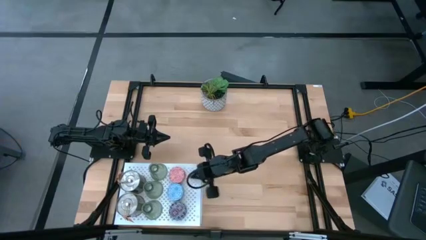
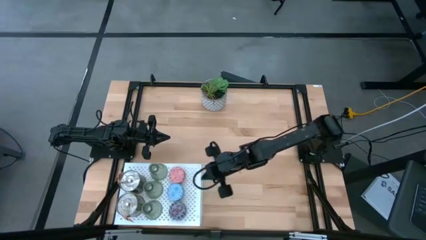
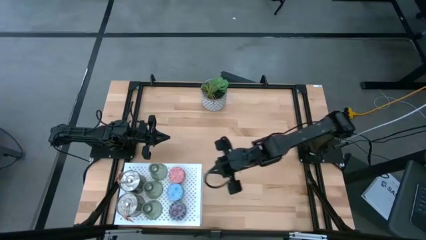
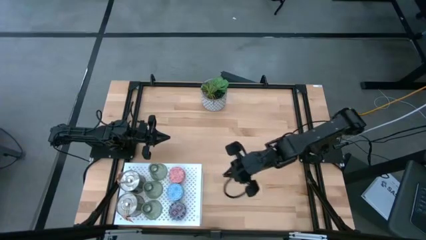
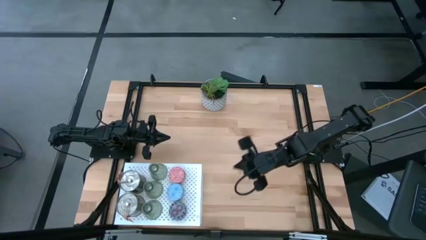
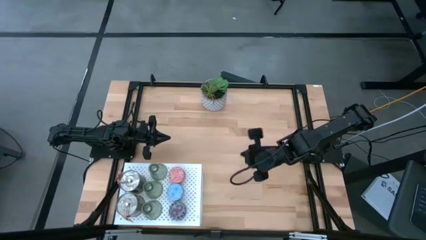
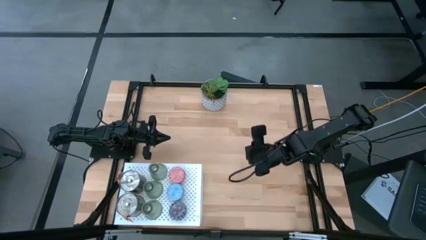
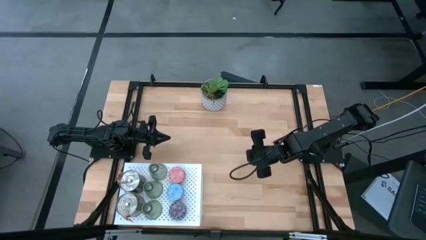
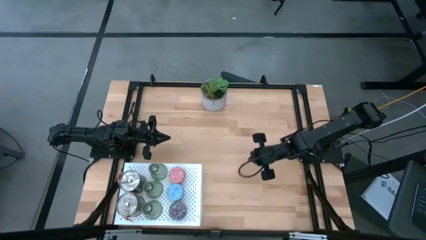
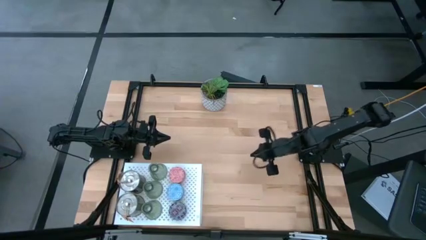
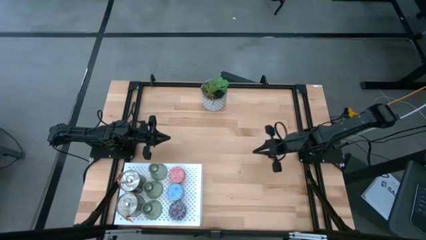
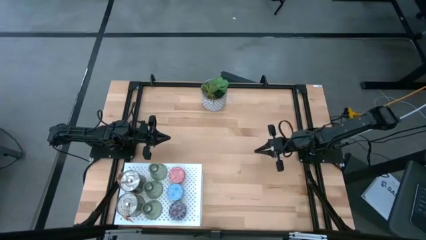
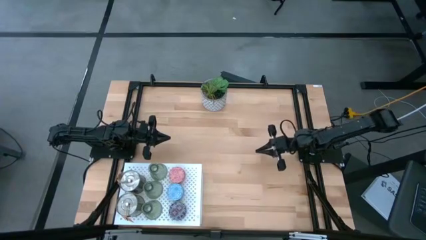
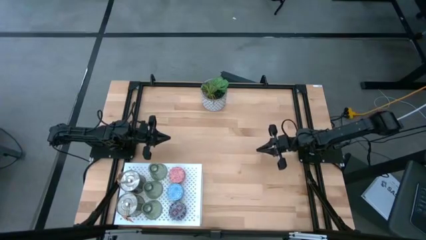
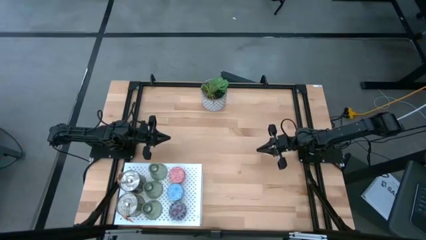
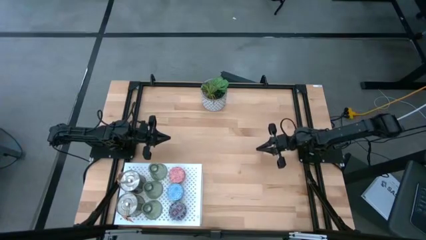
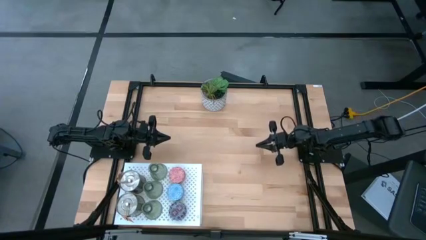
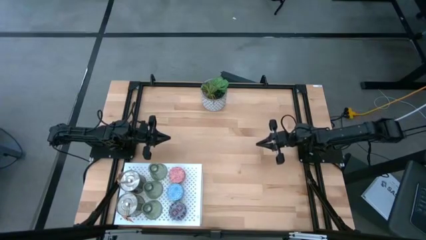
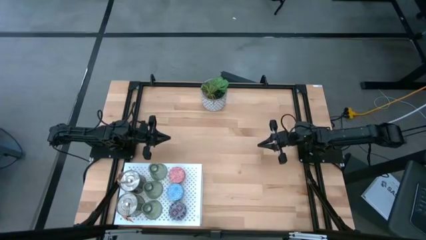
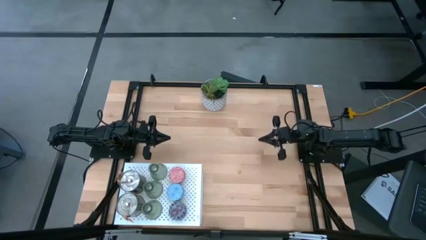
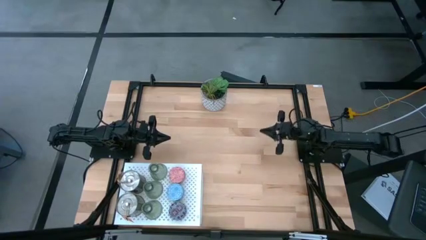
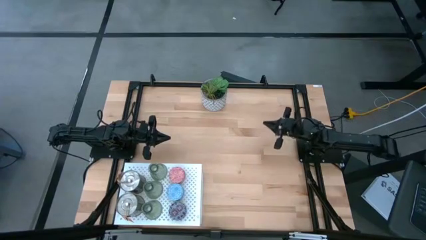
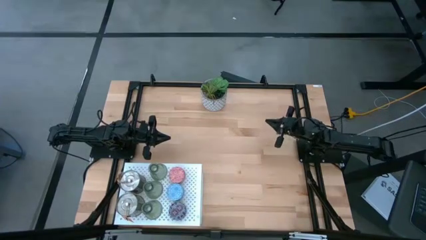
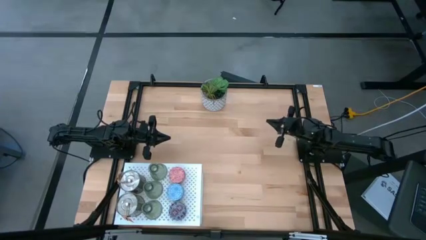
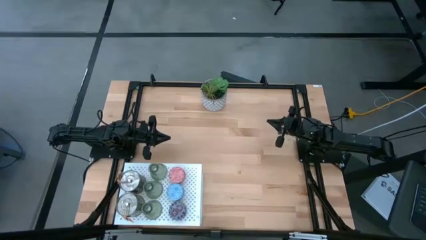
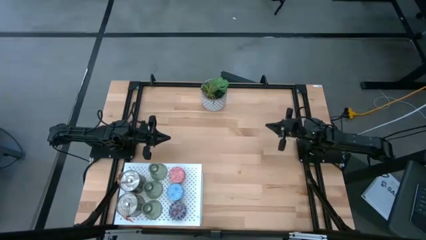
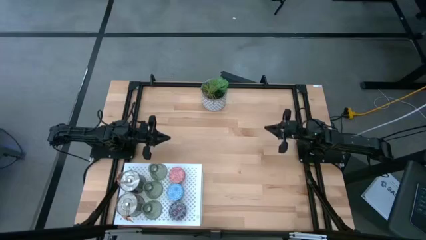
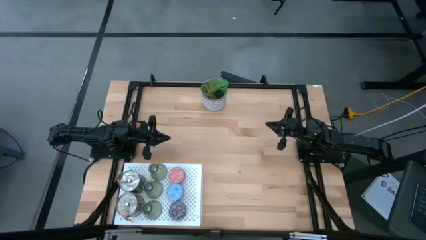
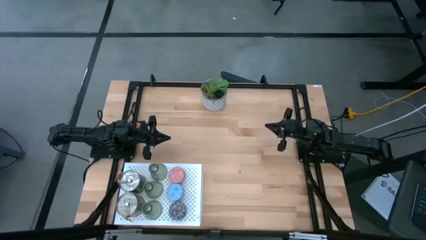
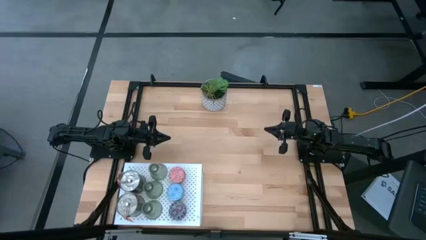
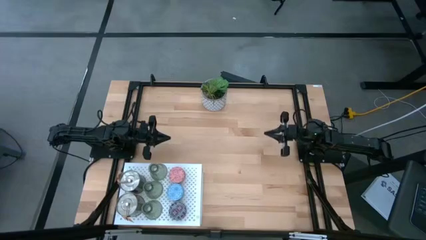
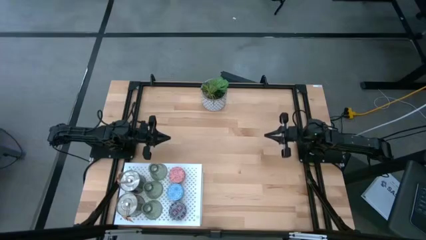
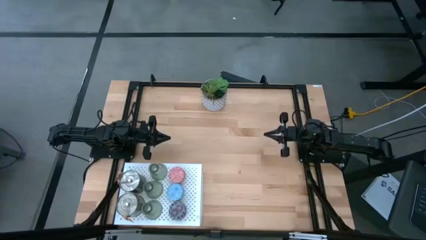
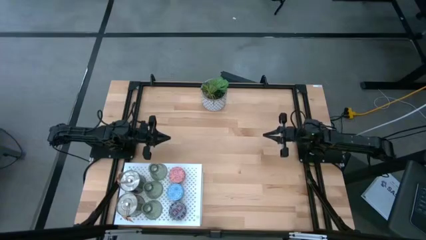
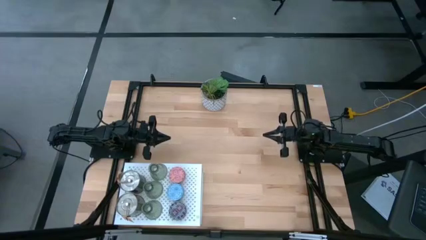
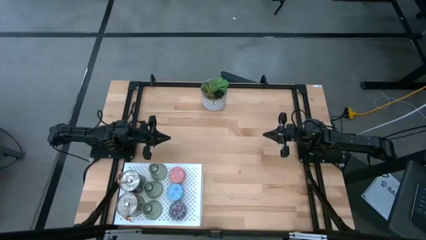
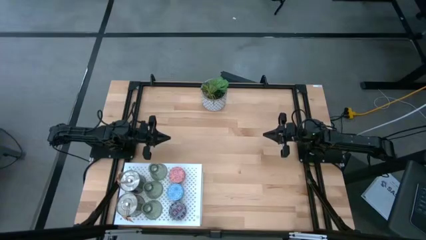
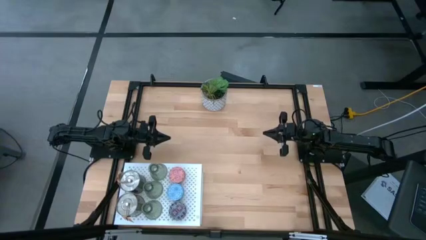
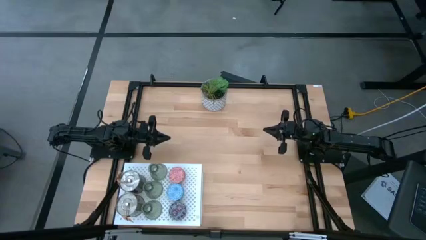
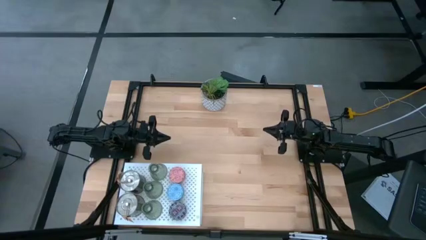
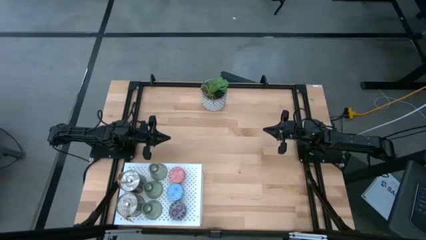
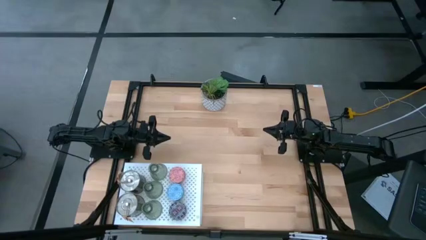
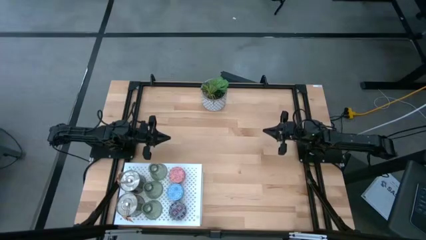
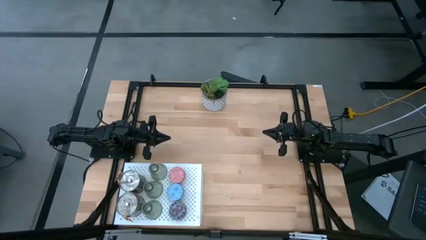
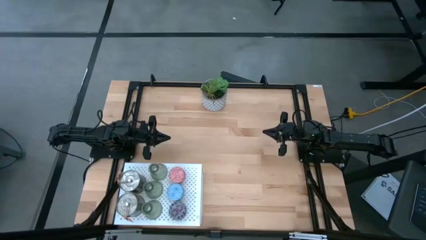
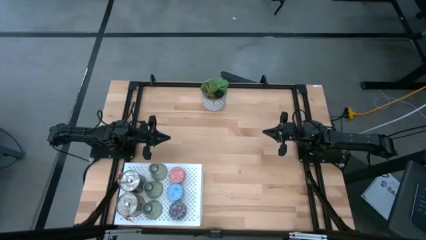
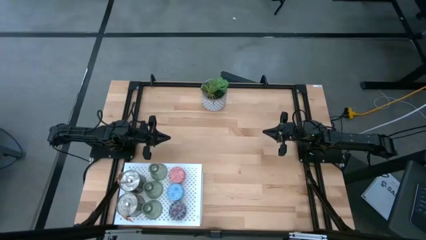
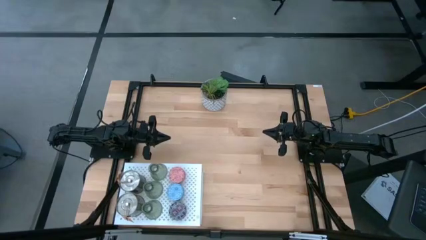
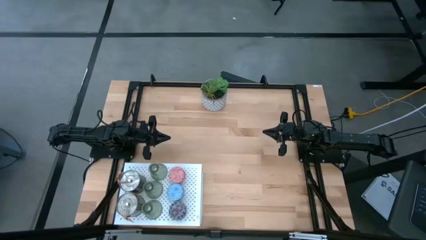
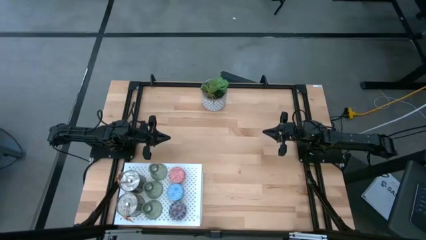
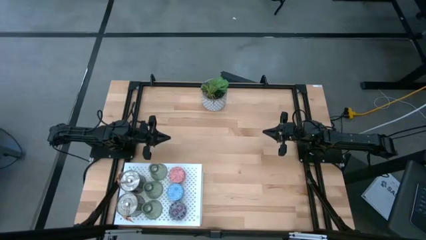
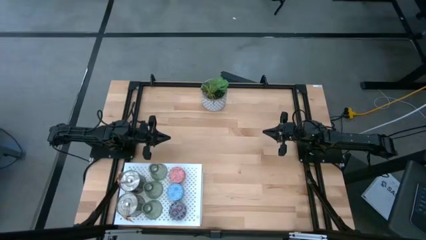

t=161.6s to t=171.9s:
Task: Pick & Place candle stick holders
Return to Home Position

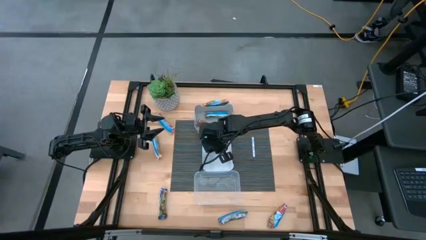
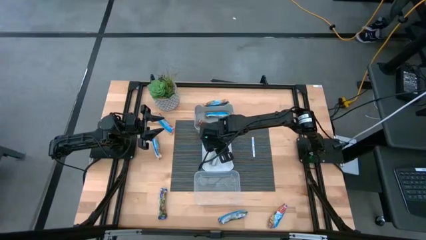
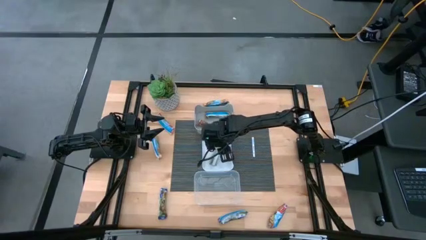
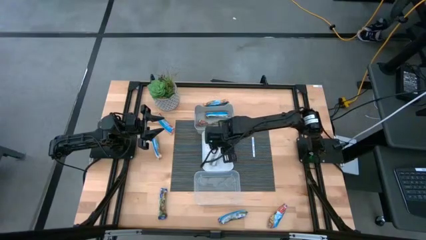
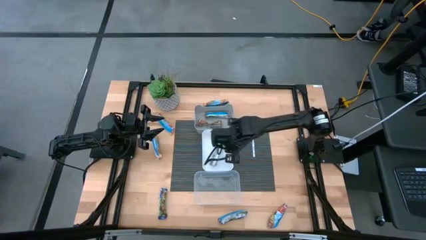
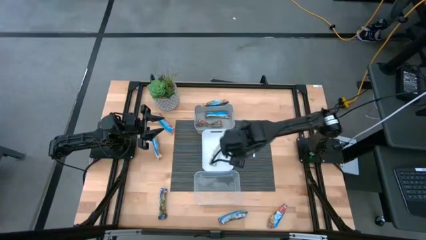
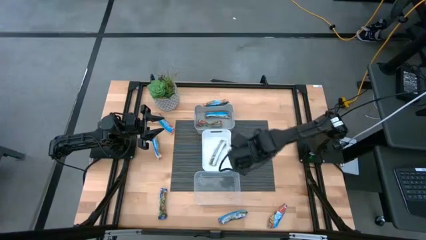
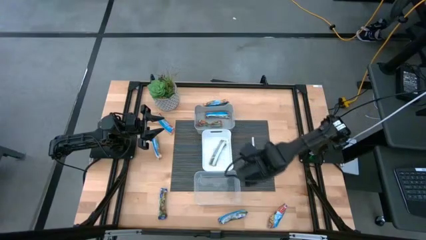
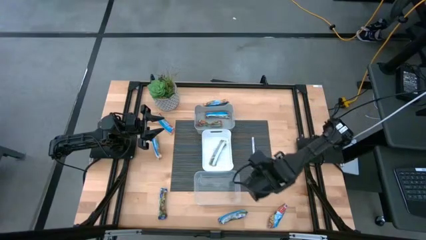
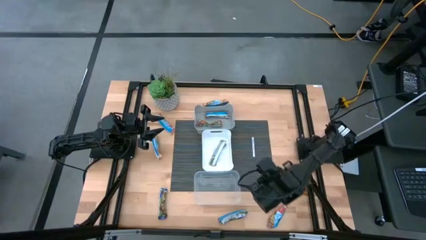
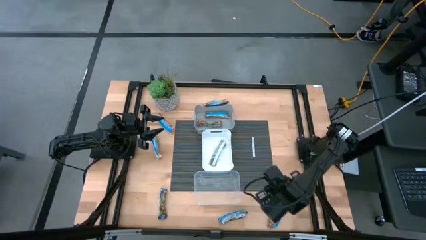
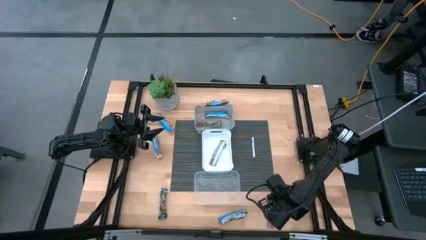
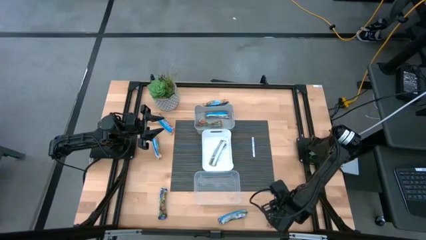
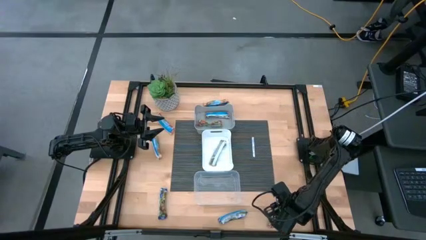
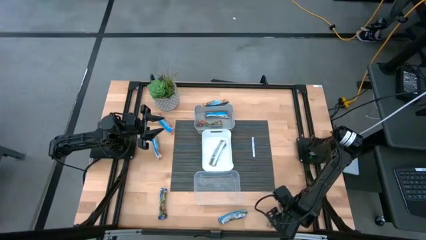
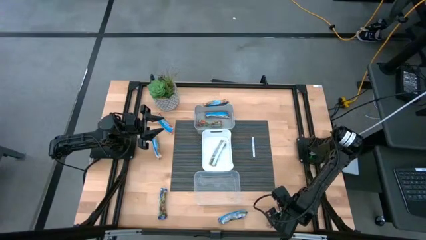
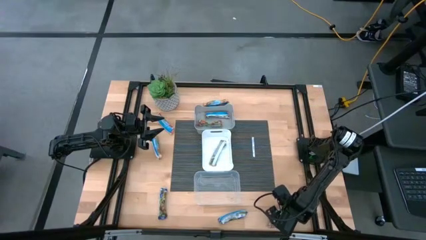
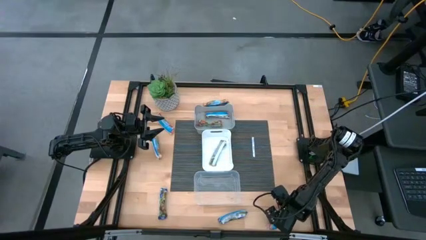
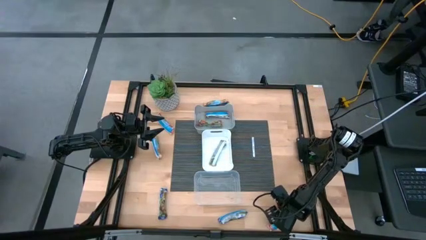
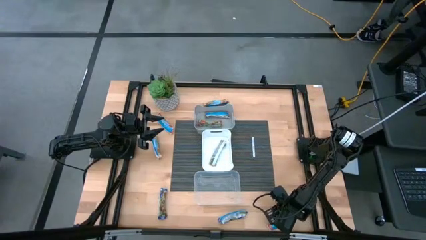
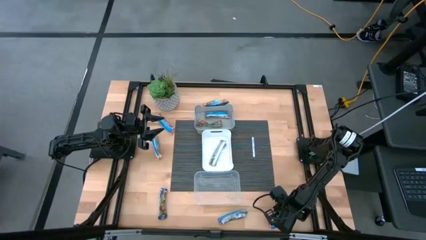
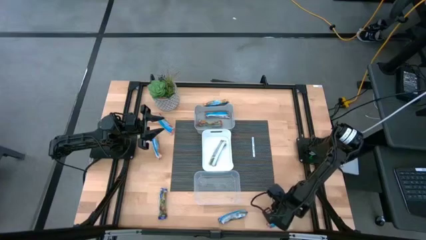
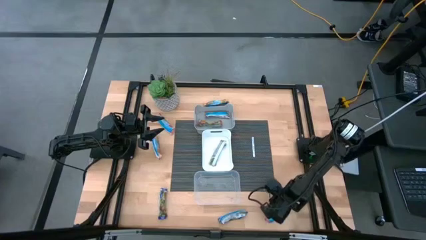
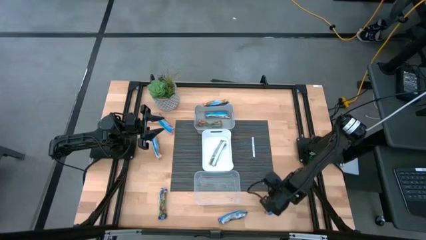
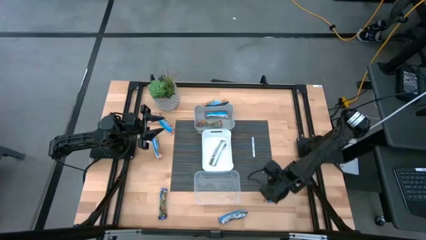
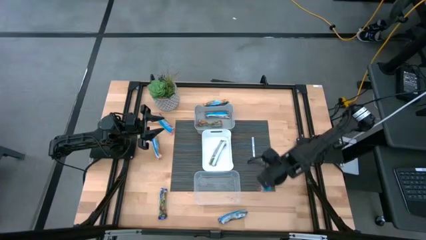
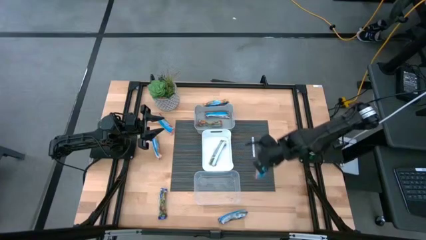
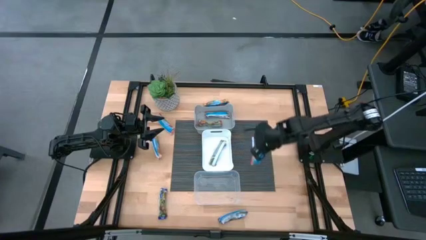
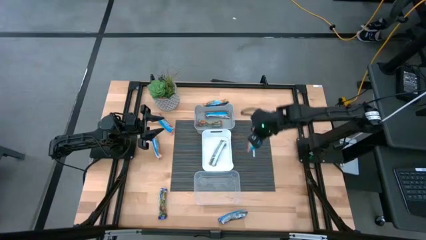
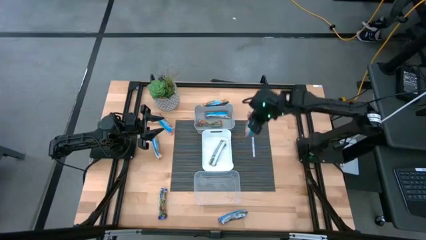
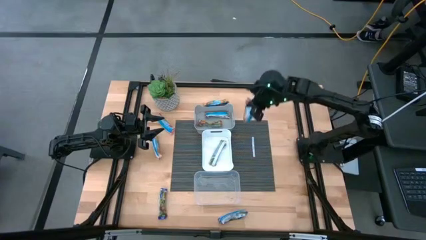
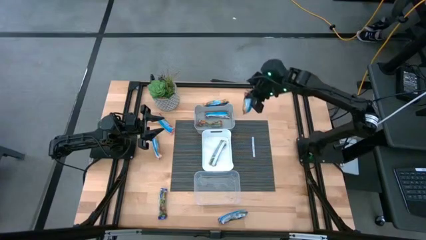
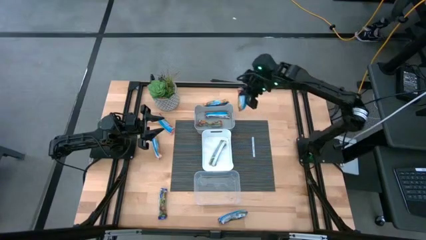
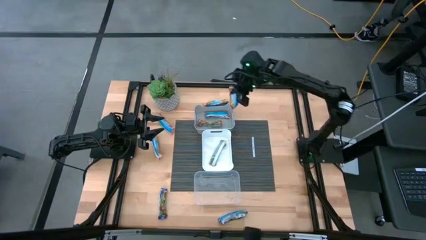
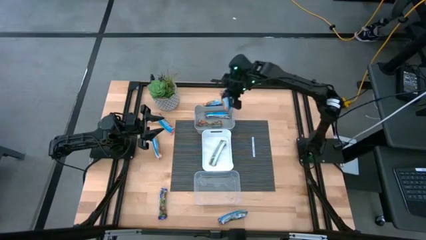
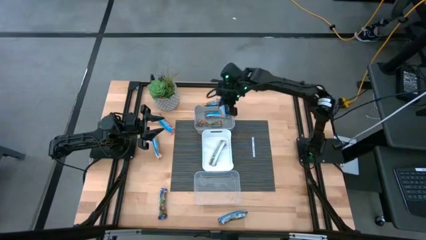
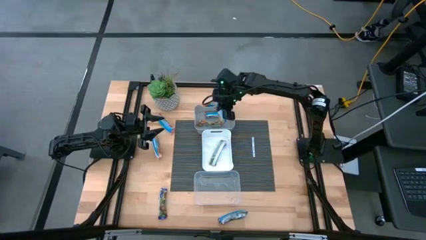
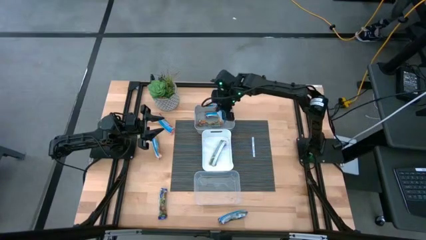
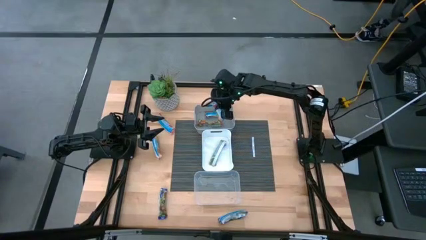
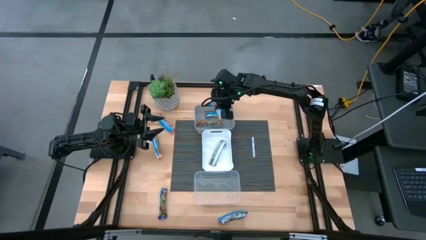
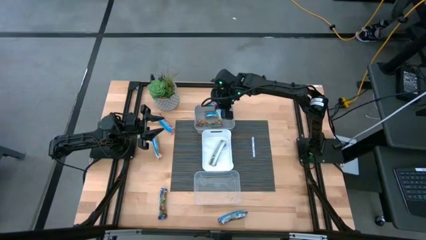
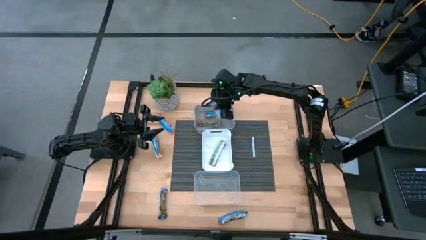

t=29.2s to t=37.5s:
Task: Pick and place Granola Bars by type
Put the bottom red granola bar into the gray bin
